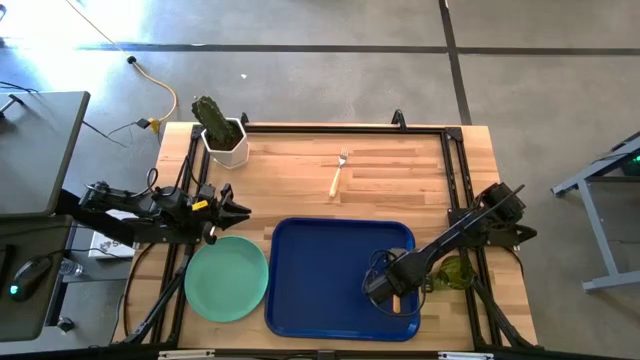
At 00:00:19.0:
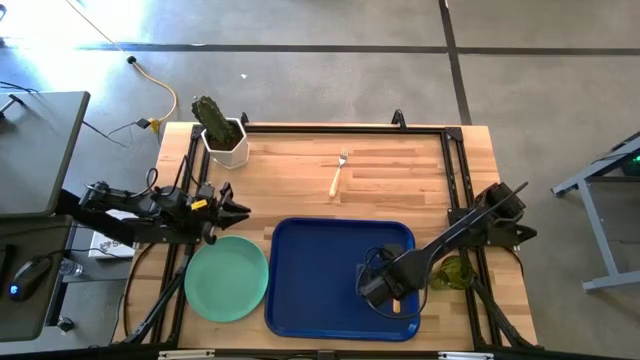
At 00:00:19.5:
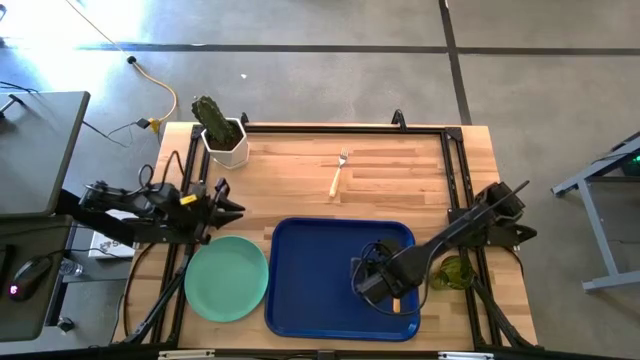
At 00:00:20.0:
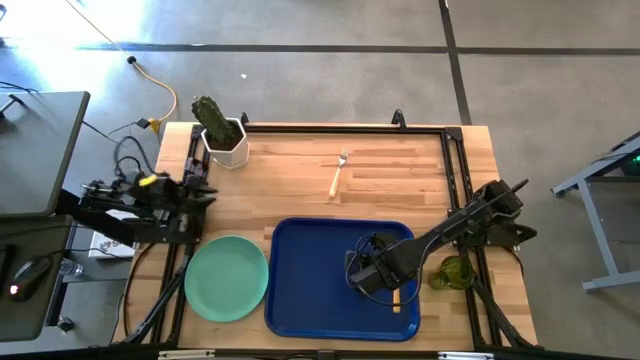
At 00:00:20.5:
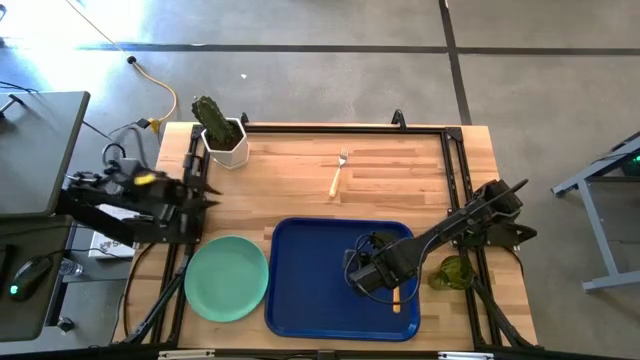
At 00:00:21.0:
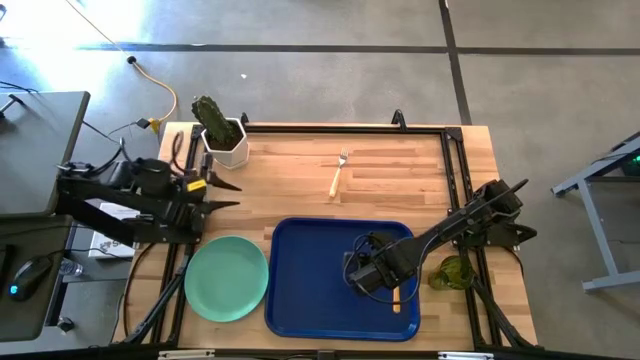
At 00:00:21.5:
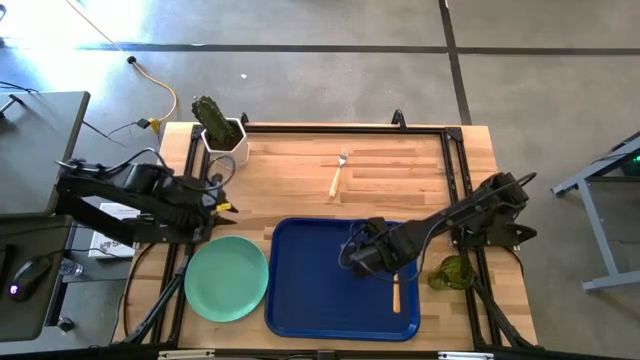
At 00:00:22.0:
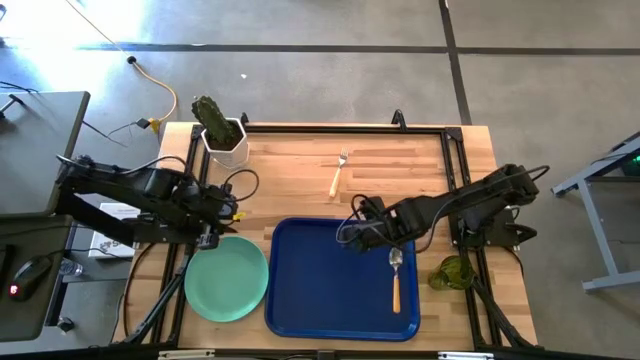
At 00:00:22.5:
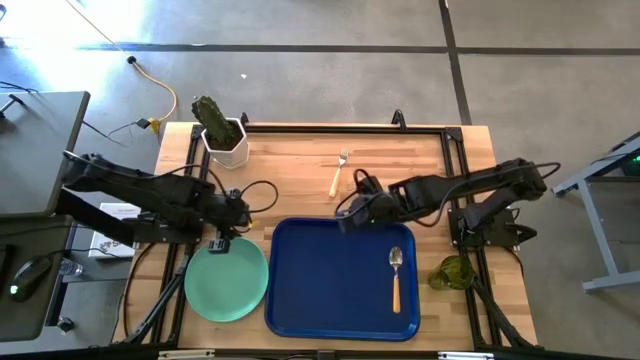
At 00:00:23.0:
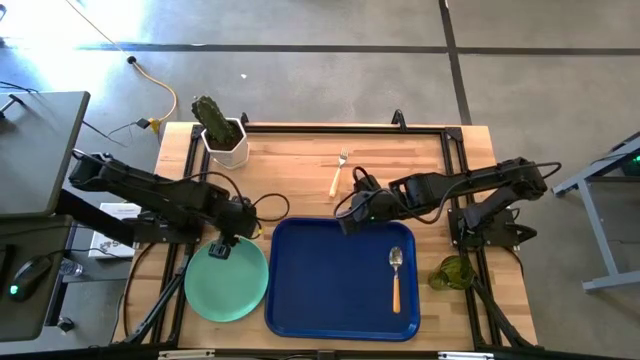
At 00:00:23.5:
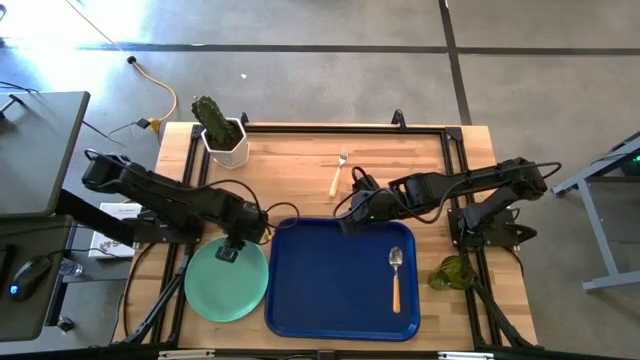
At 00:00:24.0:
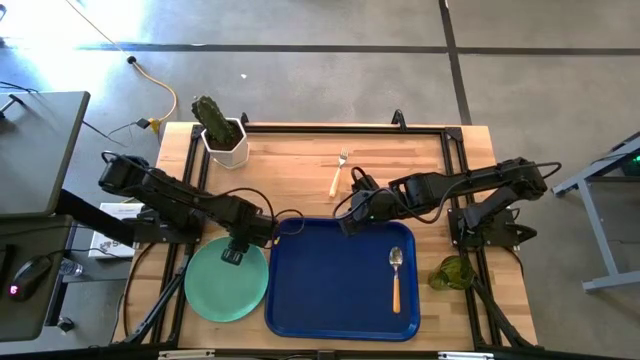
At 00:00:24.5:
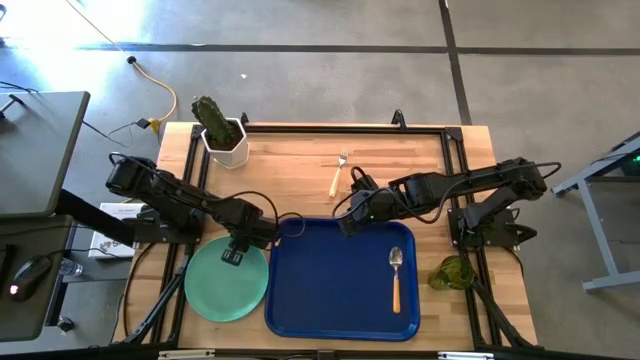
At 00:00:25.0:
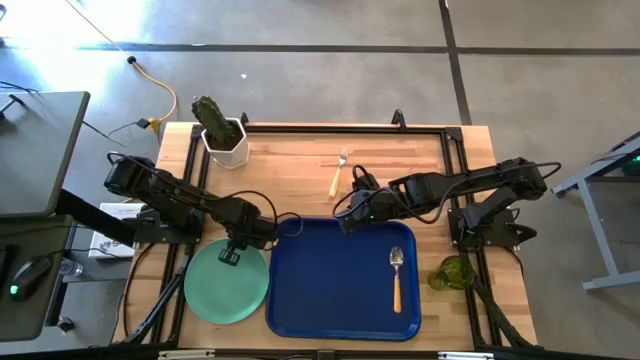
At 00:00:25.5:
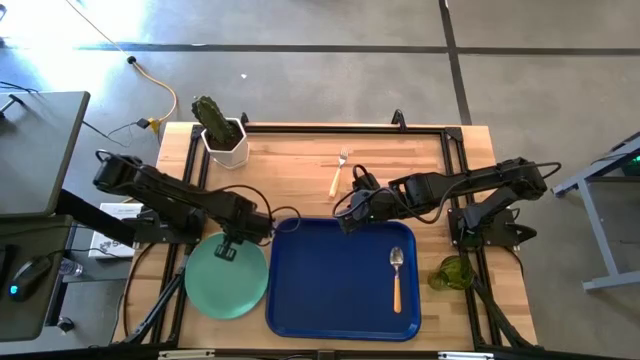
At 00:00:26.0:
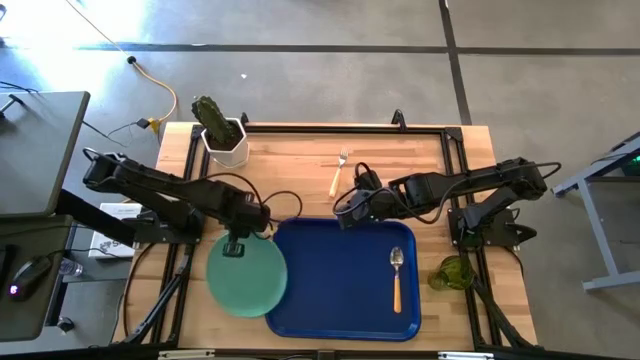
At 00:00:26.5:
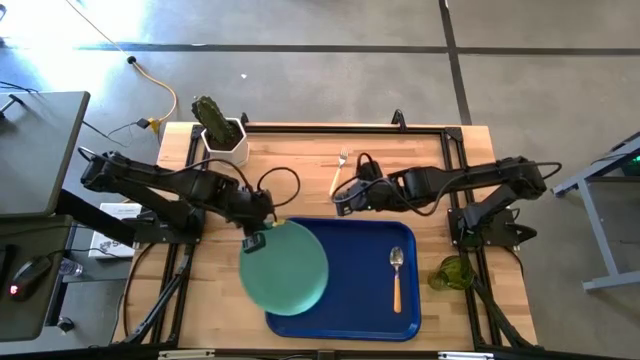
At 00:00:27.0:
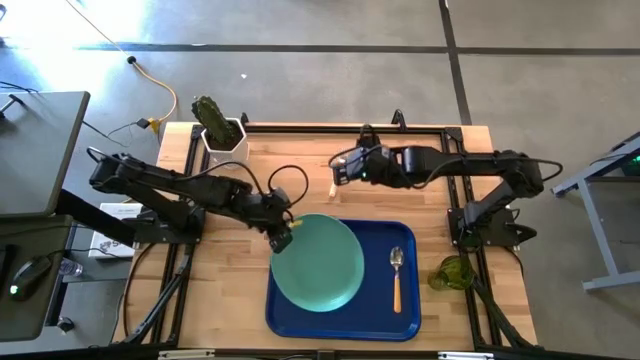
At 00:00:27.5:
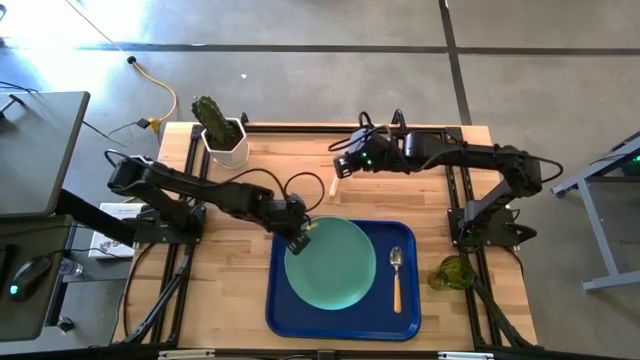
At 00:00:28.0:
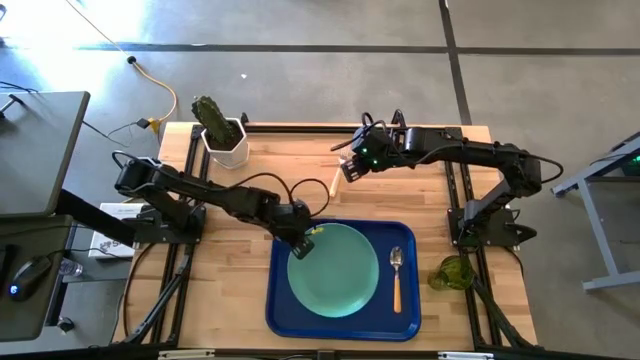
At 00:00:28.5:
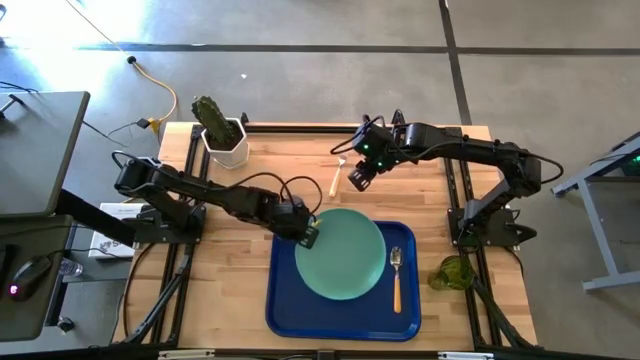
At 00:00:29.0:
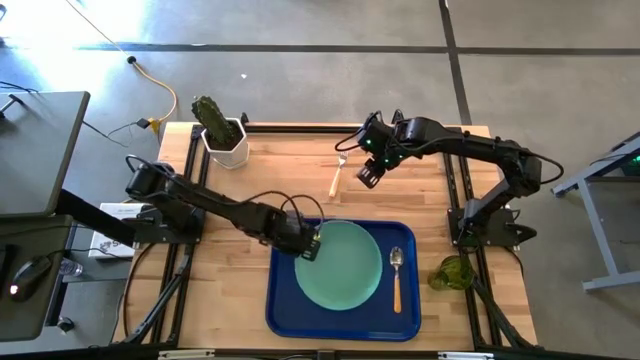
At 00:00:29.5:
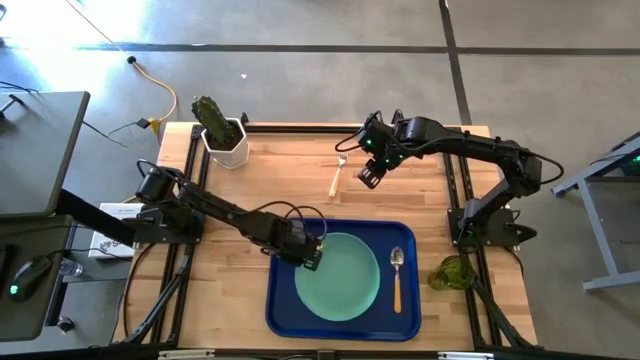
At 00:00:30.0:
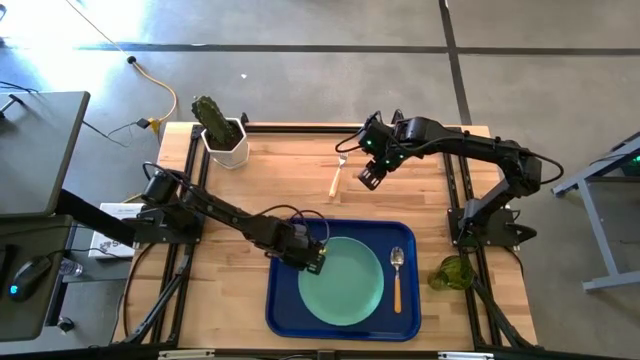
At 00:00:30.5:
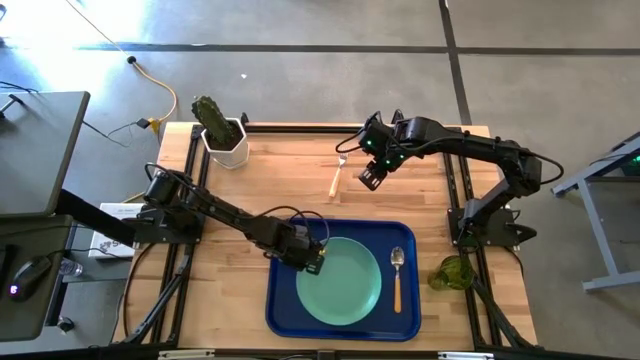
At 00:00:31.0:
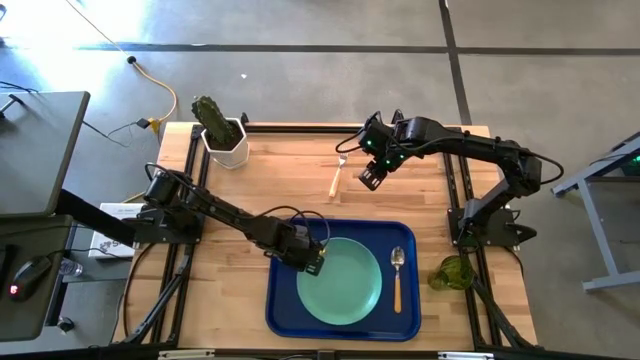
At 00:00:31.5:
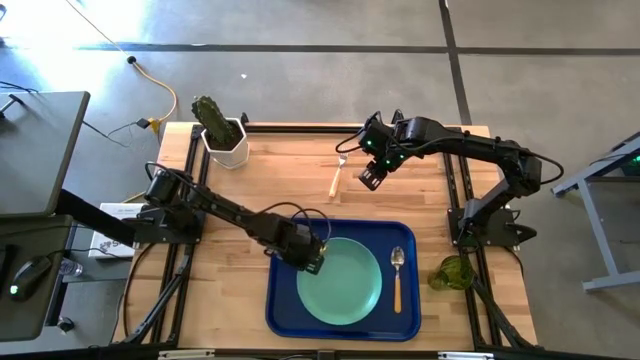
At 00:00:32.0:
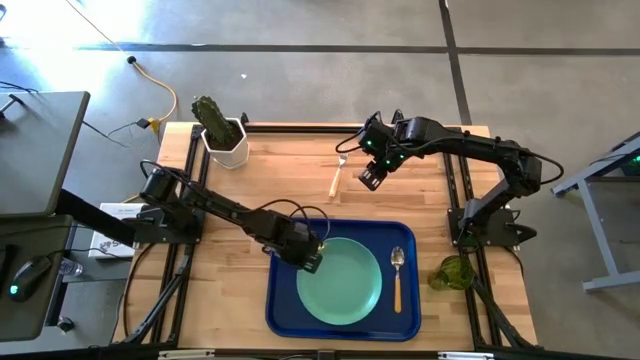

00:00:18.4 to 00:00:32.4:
Task: Pick and place plate/cup/fork/spoon on tray
Put the green plate on the blue tray to the left of the orange spoon

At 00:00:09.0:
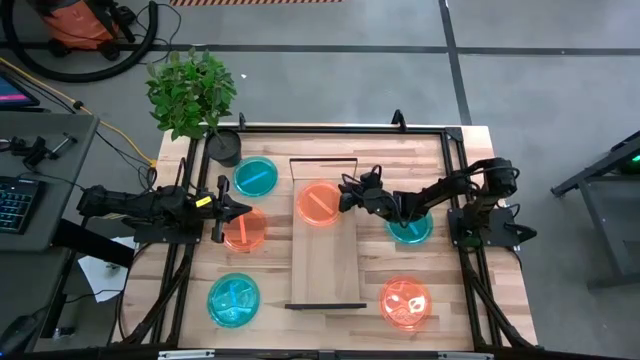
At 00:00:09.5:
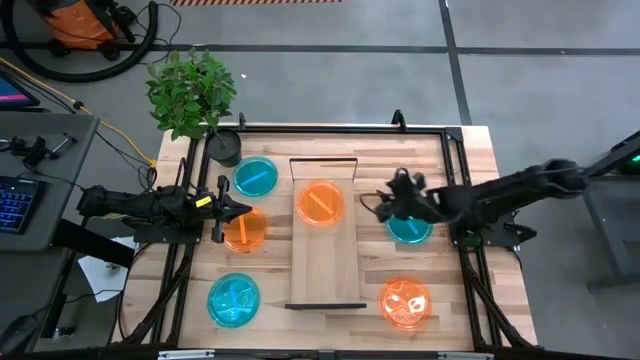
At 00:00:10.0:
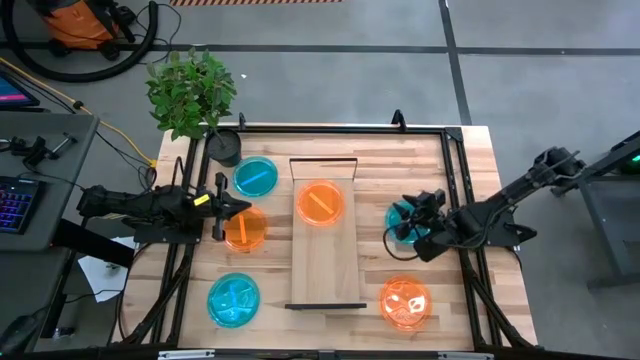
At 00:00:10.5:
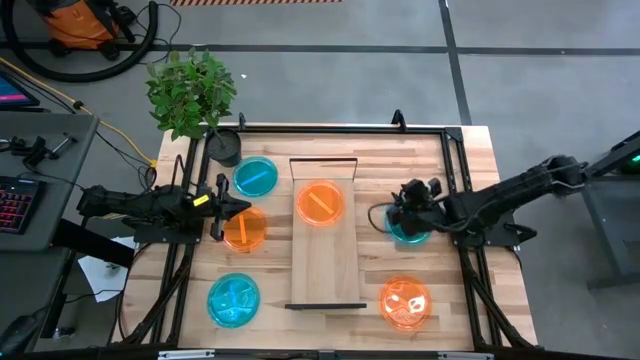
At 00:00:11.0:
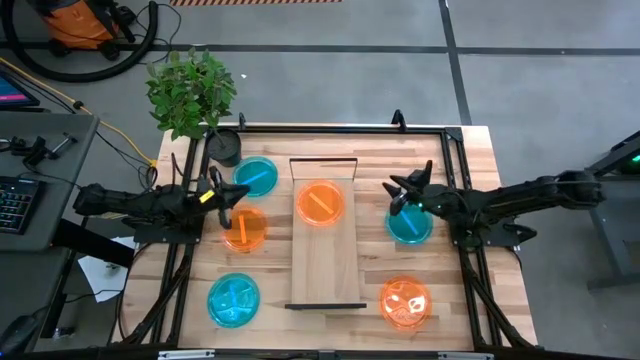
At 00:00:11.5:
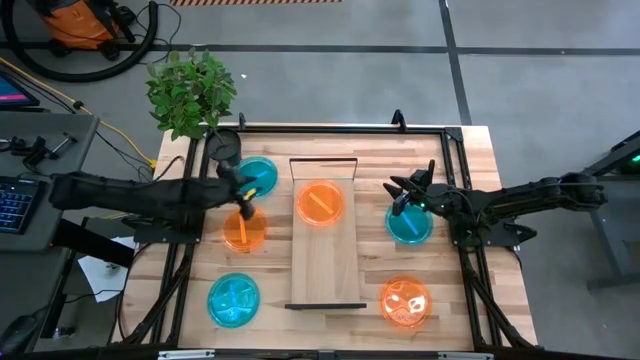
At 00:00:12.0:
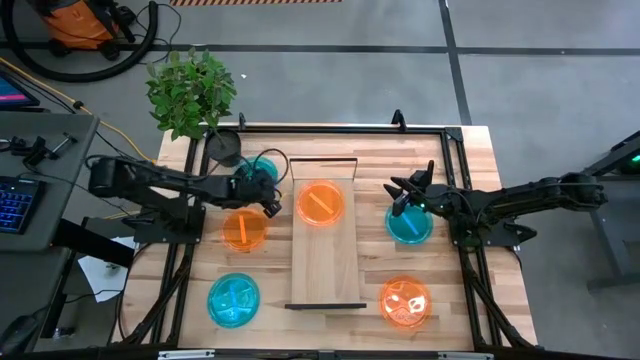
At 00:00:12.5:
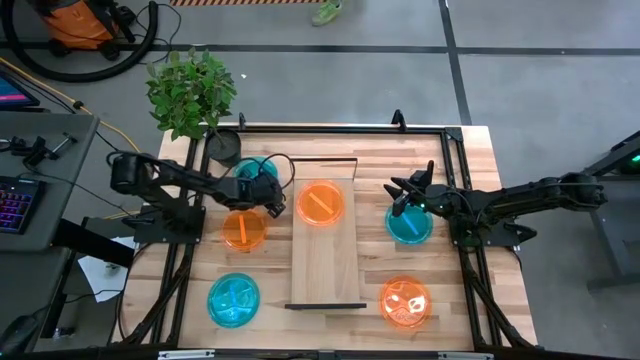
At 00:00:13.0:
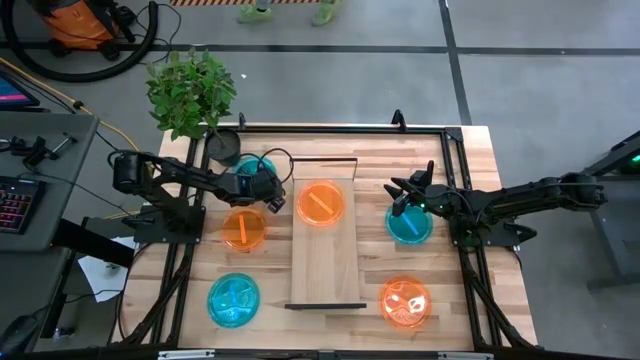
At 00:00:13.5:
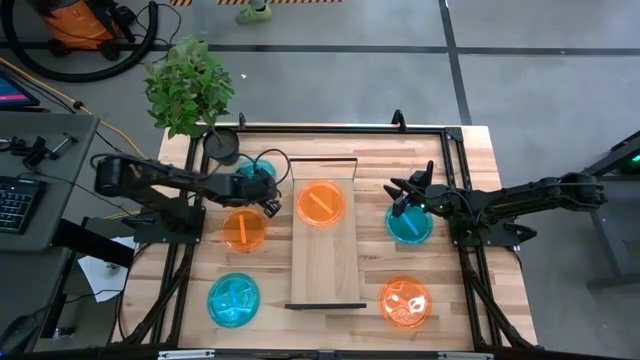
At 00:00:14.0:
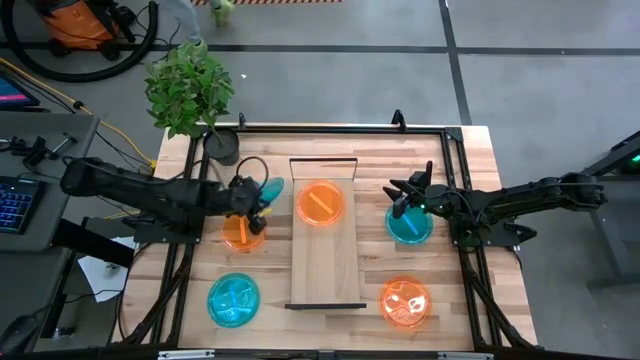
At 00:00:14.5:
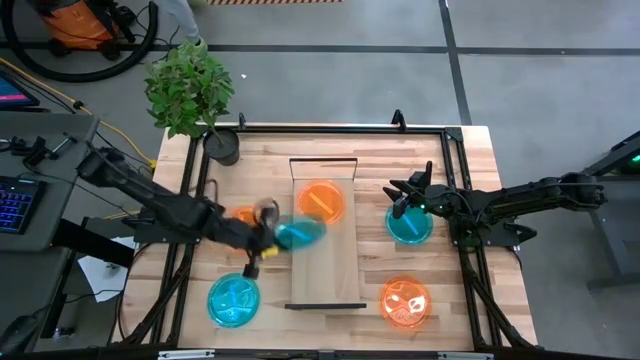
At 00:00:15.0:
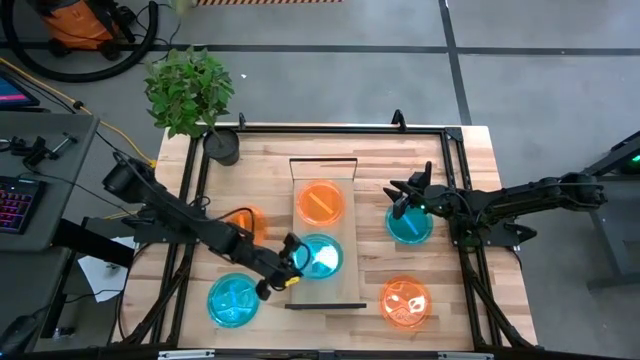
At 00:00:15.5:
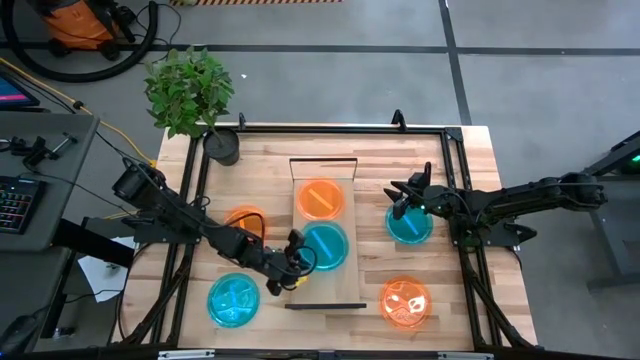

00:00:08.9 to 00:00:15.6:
Task: Place and stack plates onto a shelf
Put the top left blue plate on the shelf
